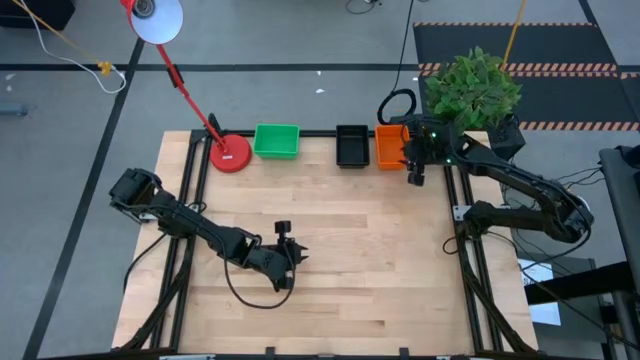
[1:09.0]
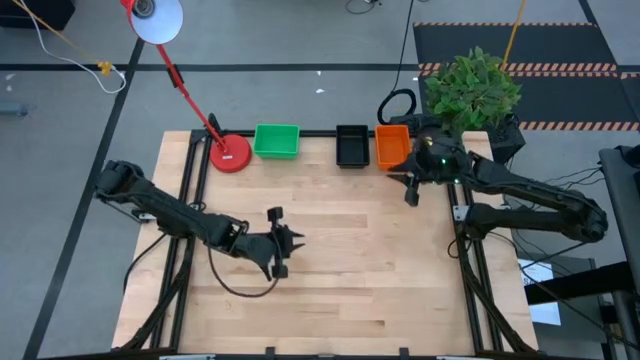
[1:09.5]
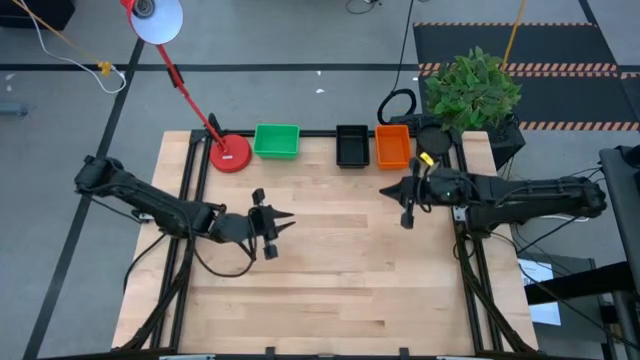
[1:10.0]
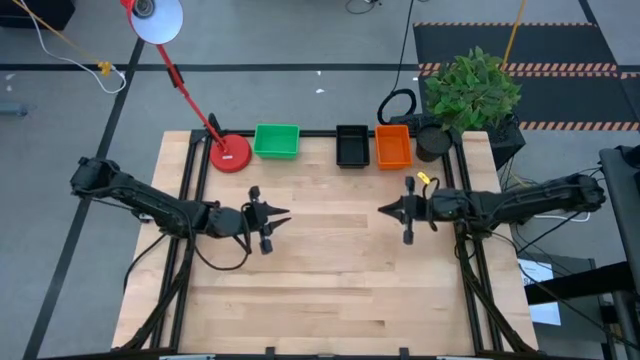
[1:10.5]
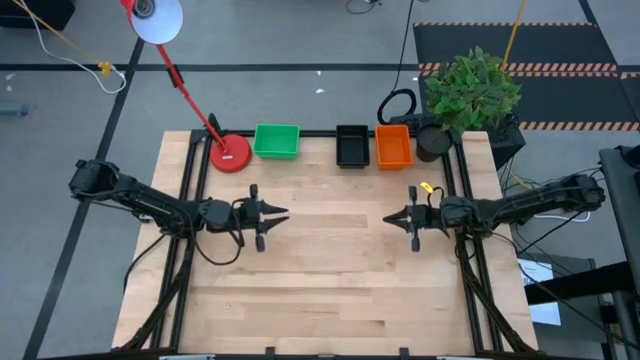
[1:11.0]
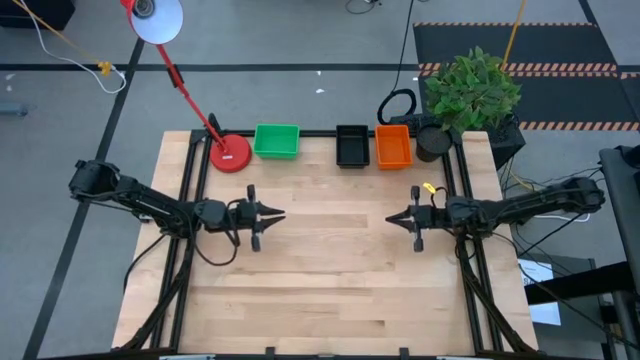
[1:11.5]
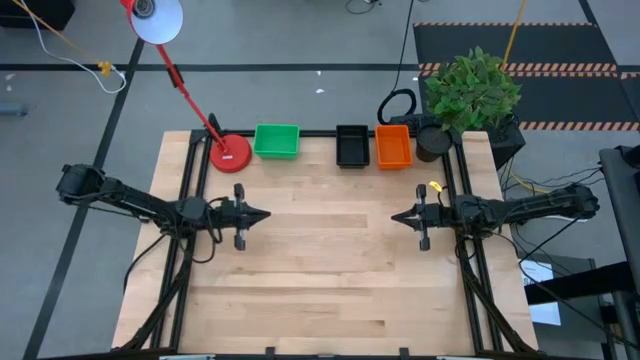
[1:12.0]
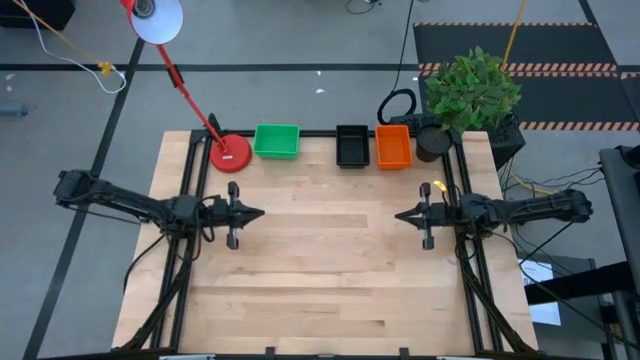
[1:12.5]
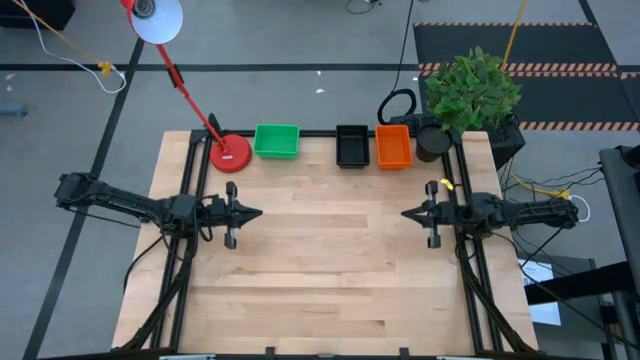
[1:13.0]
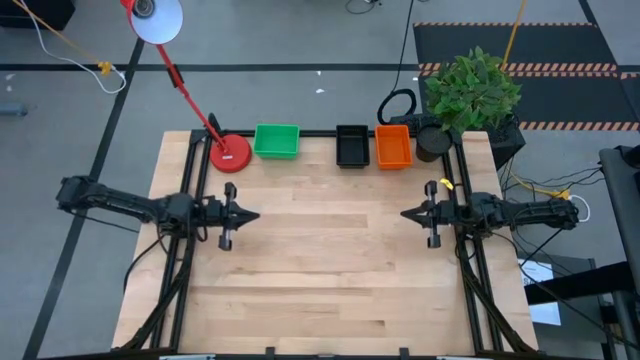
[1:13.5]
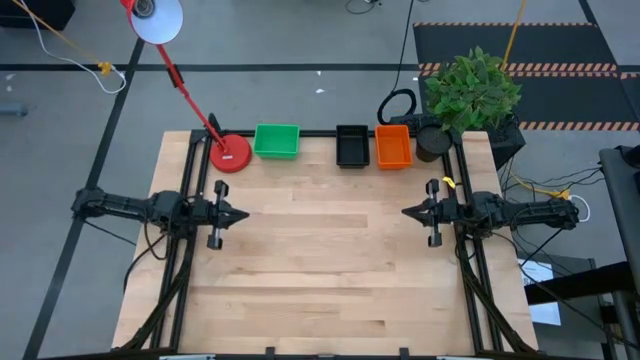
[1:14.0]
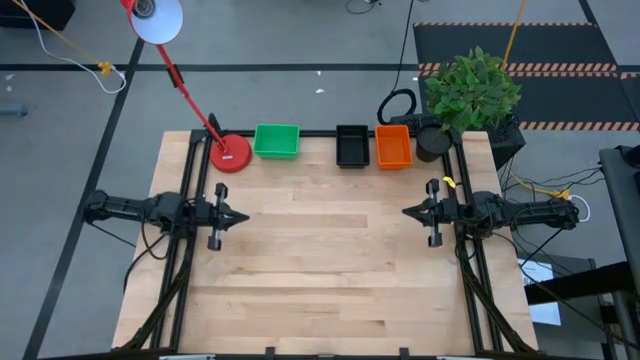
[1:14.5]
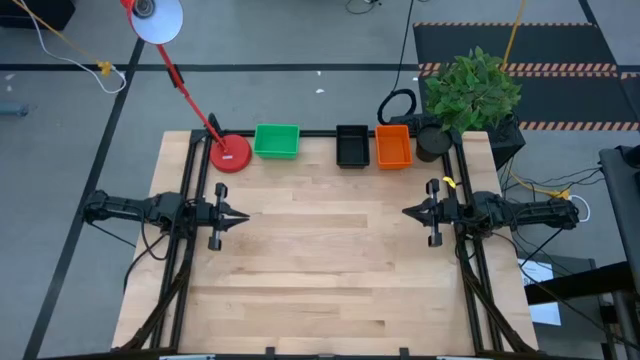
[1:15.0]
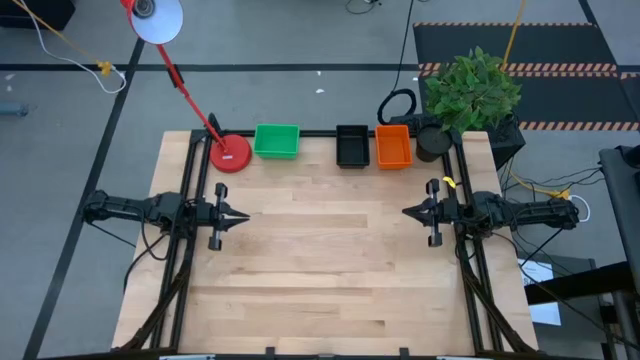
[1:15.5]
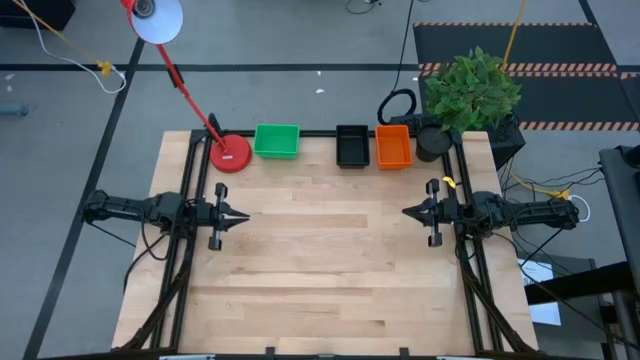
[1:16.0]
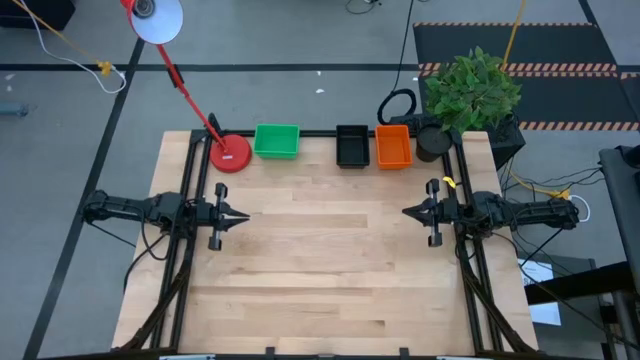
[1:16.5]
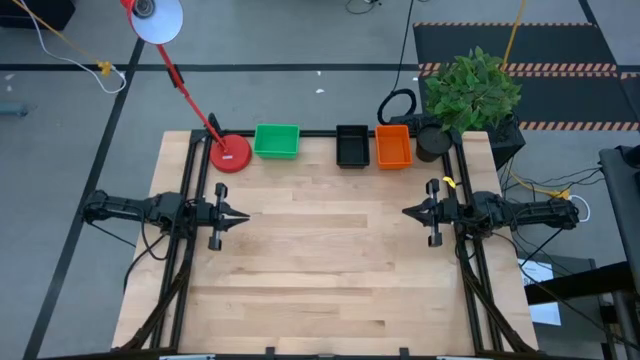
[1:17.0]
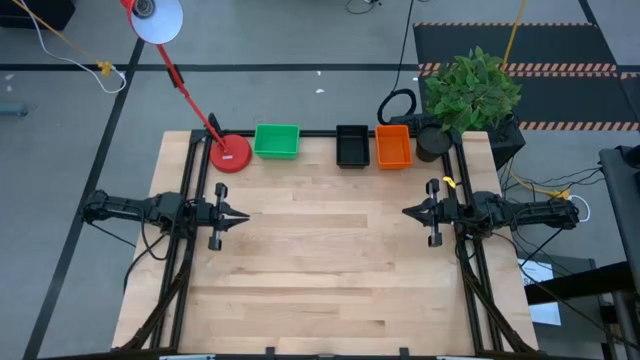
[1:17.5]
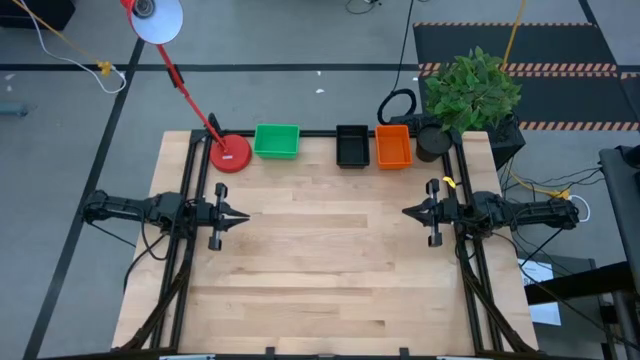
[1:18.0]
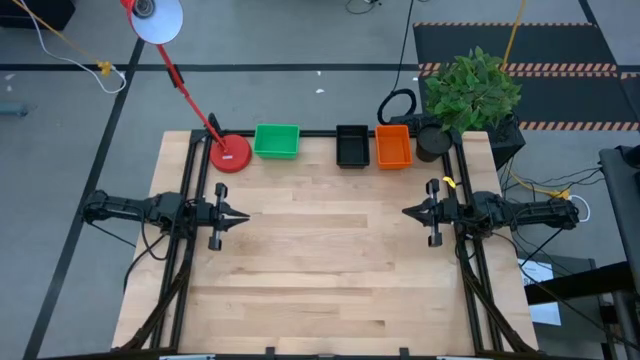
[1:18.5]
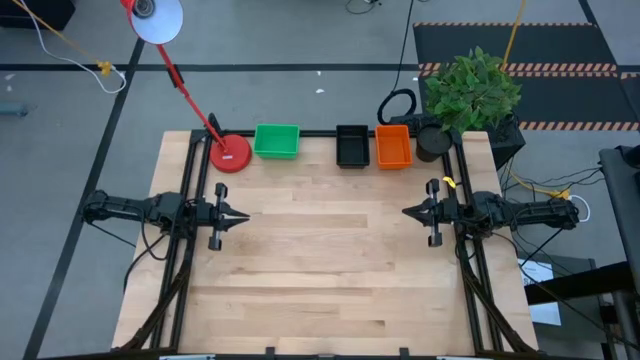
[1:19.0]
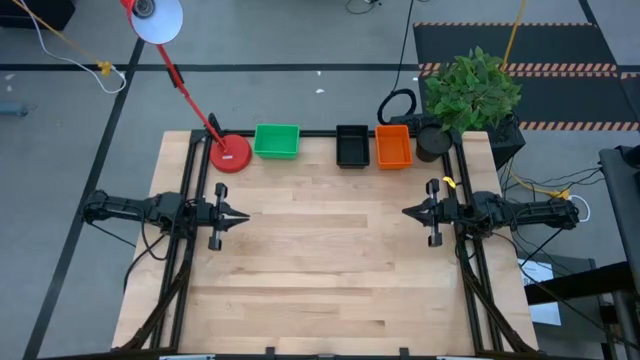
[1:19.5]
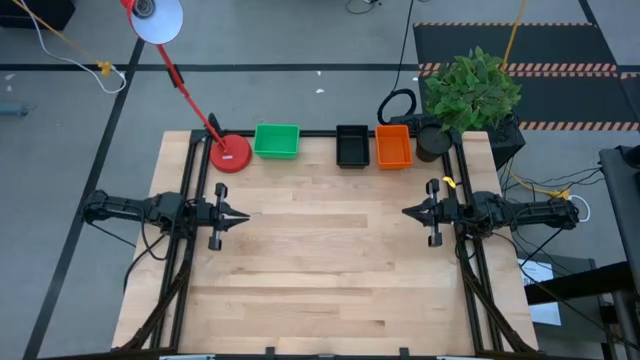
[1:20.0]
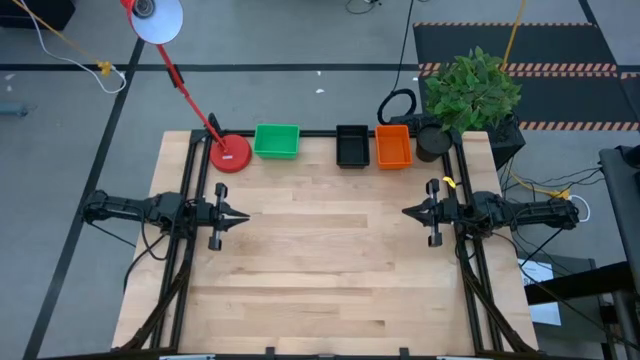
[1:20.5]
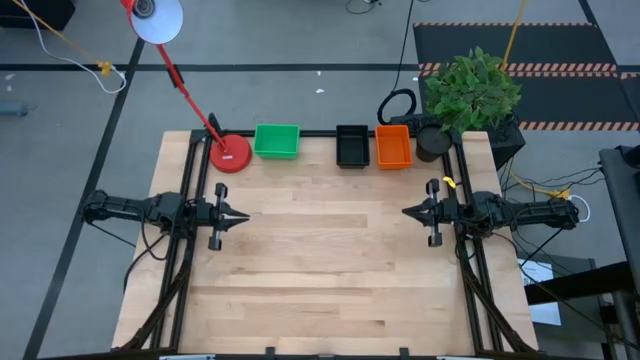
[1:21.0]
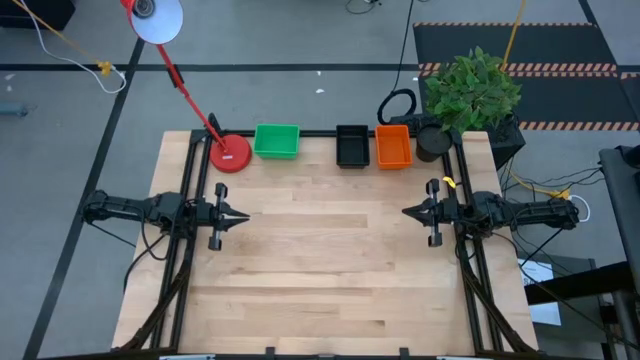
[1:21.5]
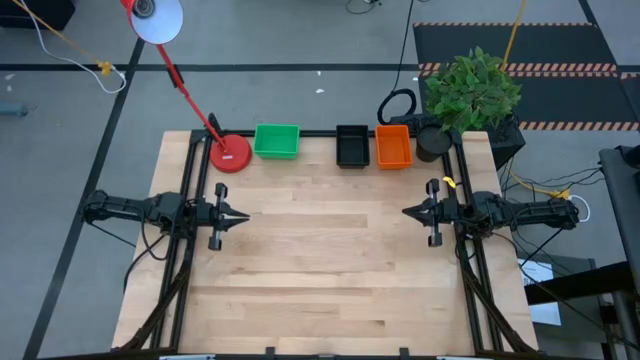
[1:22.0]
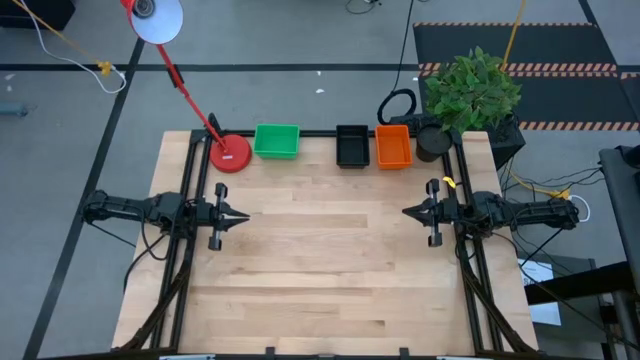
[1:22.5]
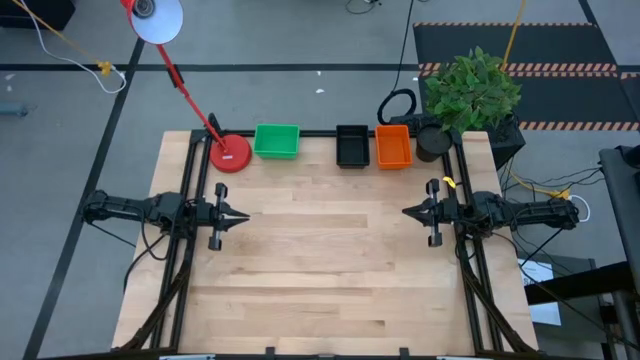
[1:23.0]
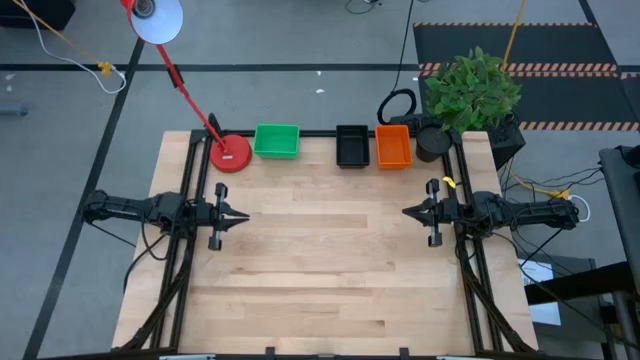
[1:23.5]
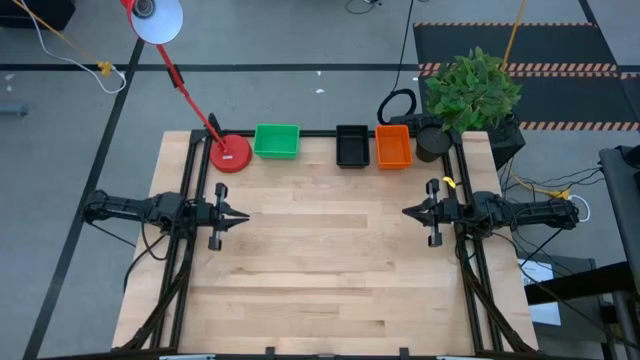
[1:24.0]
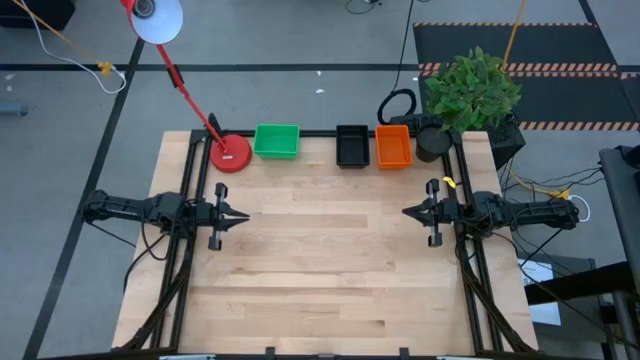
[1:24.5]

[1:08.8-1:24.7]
Return to Home Position
